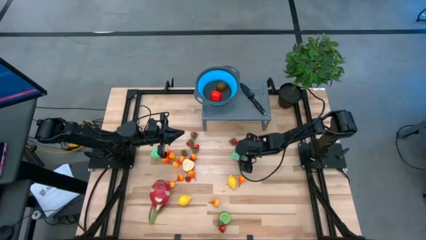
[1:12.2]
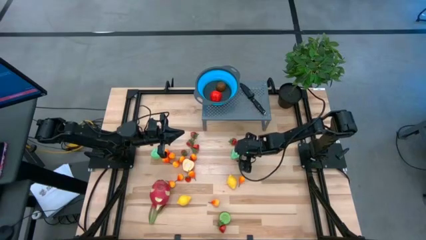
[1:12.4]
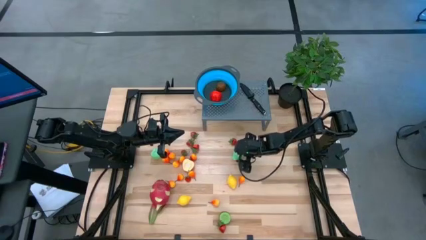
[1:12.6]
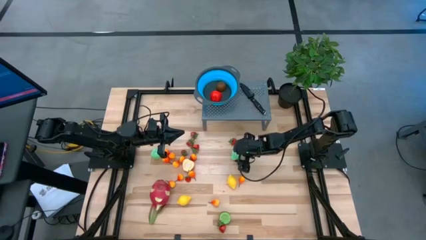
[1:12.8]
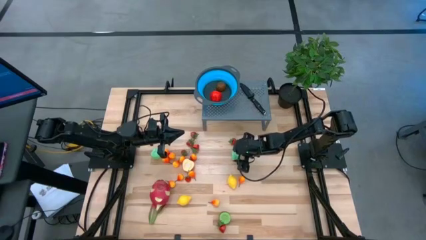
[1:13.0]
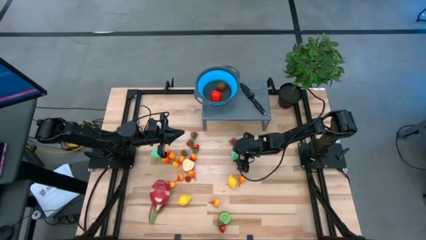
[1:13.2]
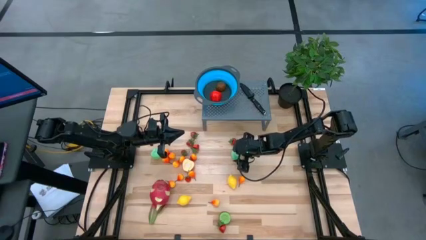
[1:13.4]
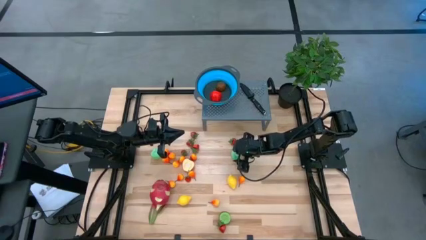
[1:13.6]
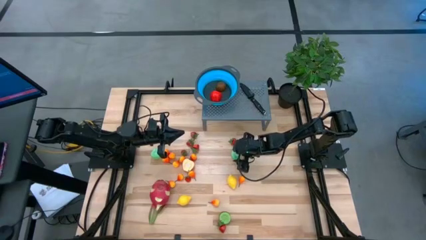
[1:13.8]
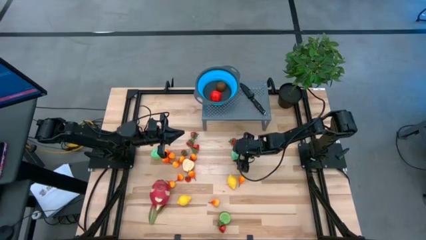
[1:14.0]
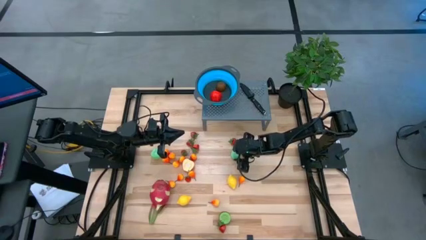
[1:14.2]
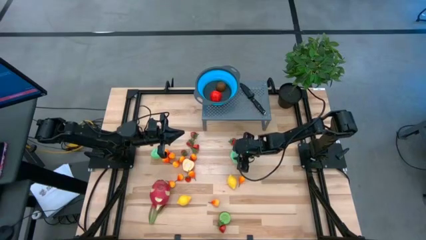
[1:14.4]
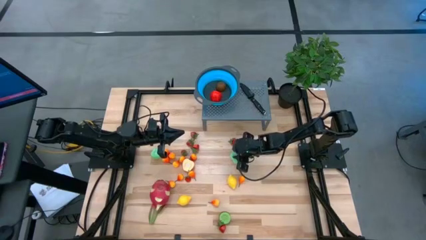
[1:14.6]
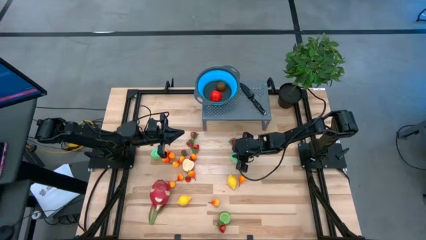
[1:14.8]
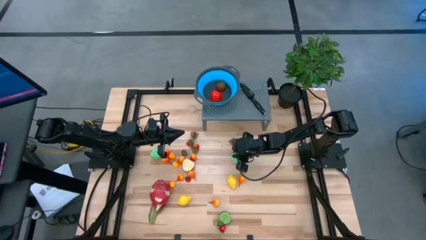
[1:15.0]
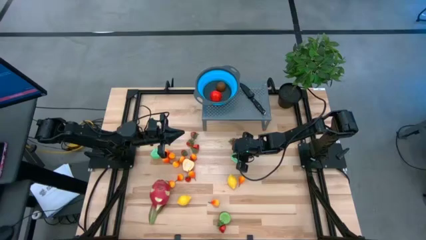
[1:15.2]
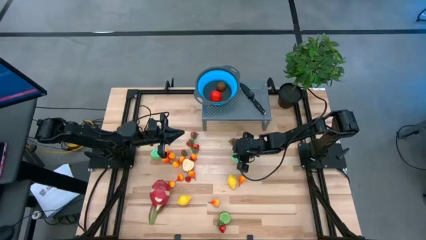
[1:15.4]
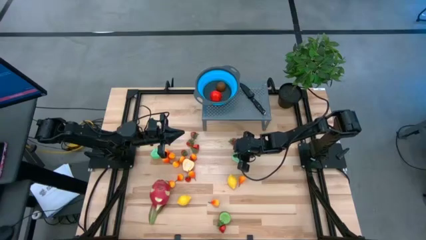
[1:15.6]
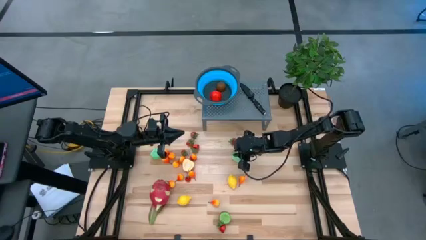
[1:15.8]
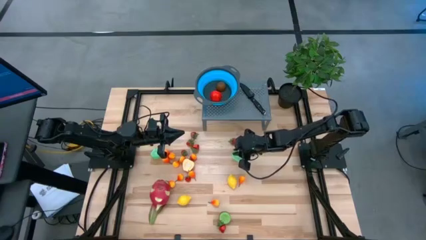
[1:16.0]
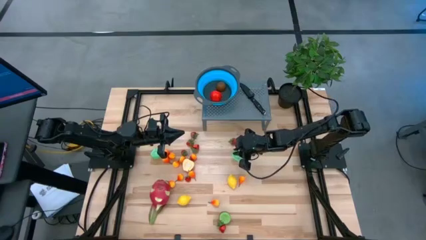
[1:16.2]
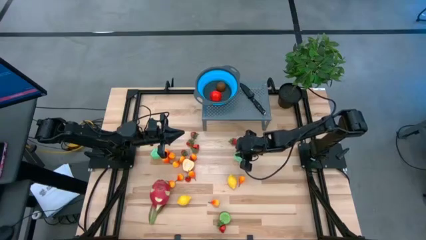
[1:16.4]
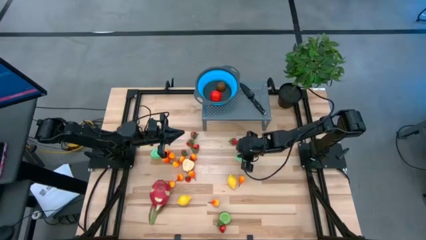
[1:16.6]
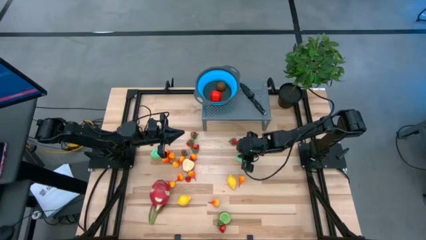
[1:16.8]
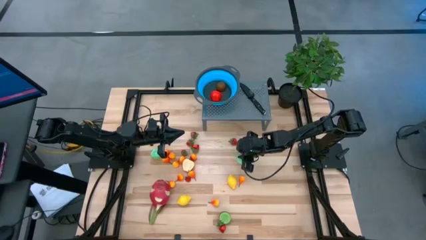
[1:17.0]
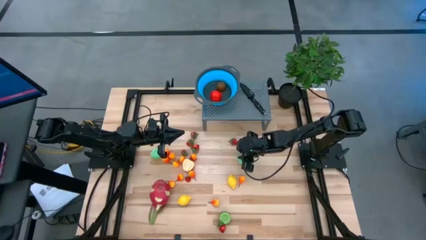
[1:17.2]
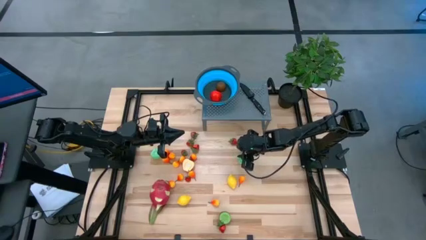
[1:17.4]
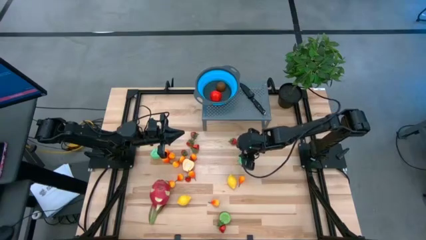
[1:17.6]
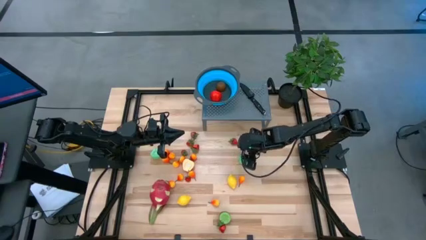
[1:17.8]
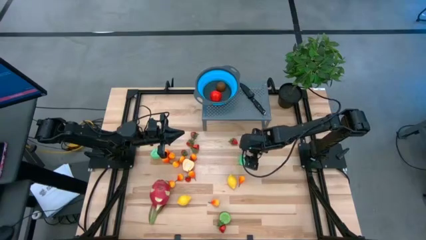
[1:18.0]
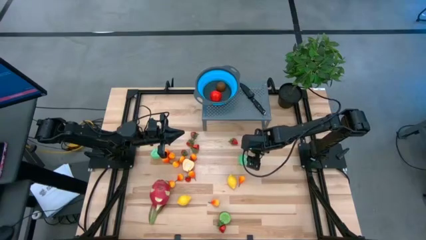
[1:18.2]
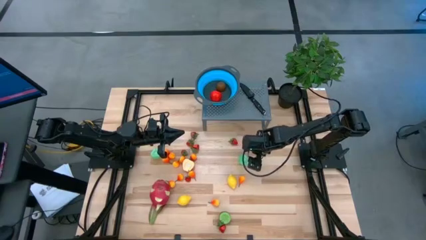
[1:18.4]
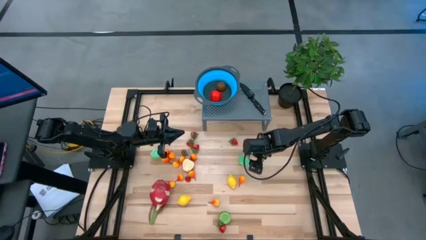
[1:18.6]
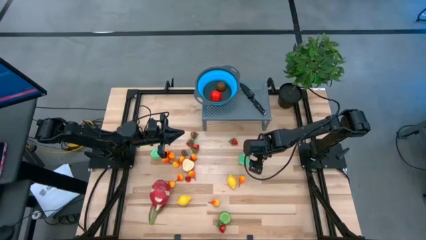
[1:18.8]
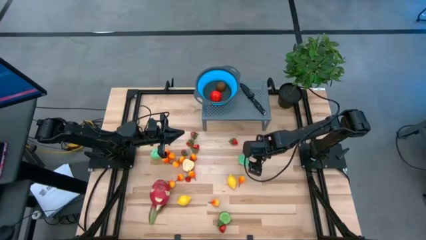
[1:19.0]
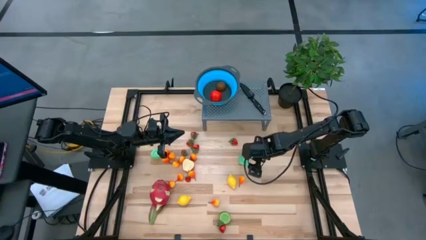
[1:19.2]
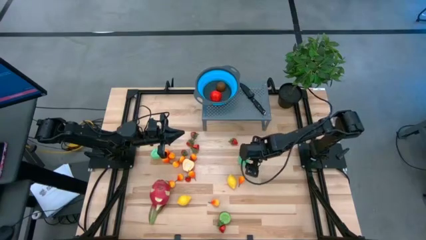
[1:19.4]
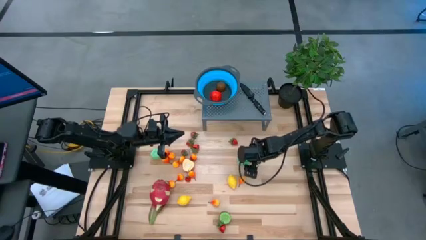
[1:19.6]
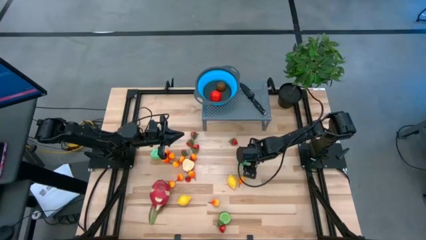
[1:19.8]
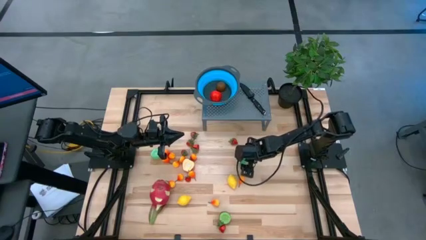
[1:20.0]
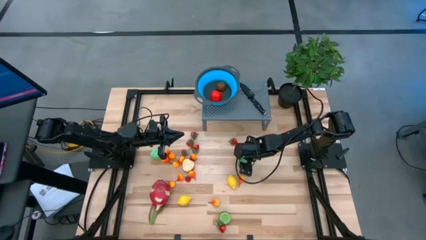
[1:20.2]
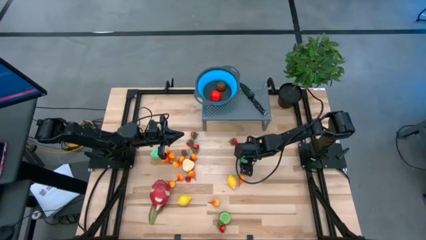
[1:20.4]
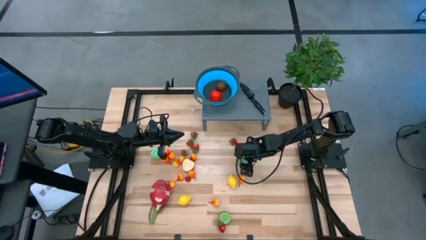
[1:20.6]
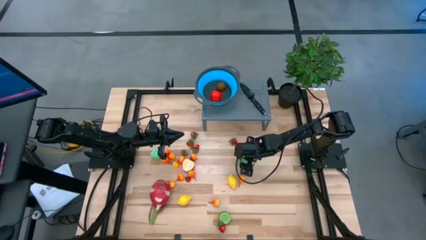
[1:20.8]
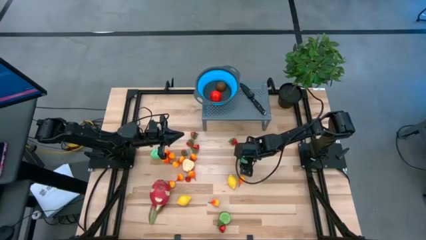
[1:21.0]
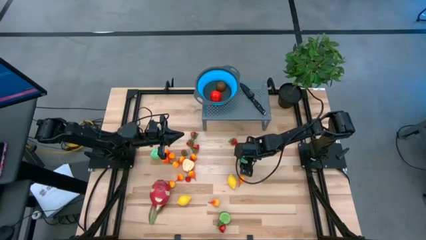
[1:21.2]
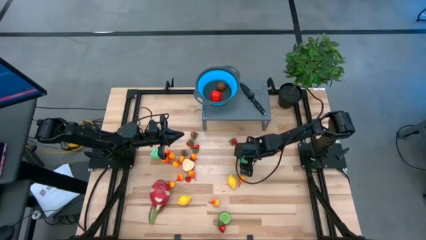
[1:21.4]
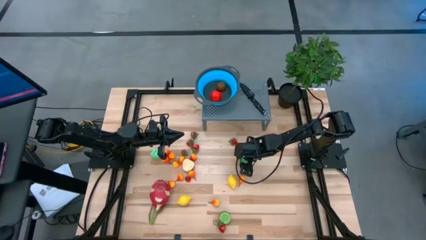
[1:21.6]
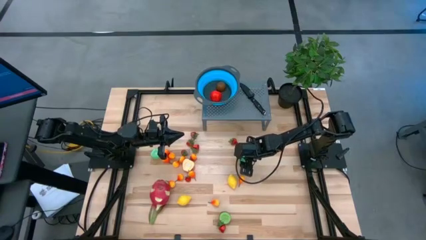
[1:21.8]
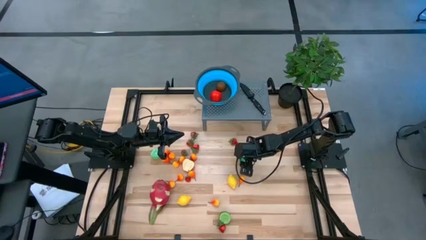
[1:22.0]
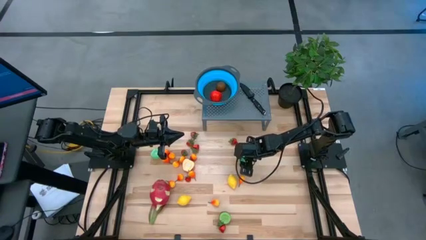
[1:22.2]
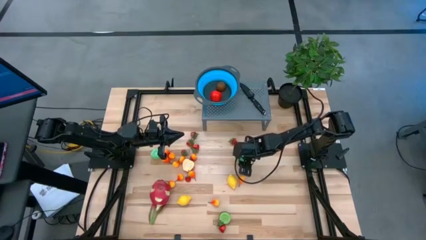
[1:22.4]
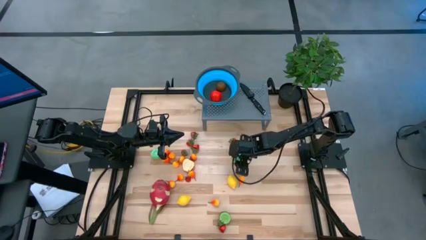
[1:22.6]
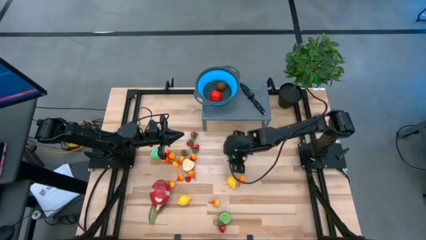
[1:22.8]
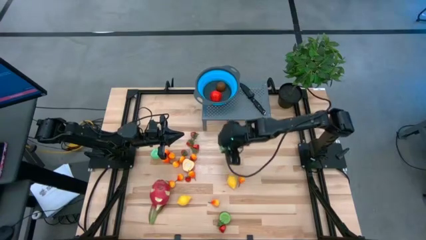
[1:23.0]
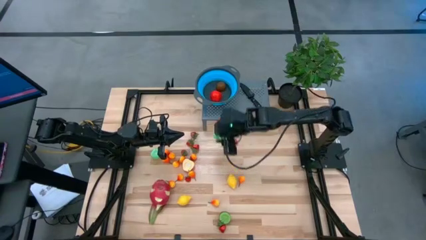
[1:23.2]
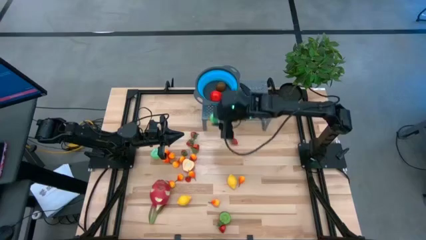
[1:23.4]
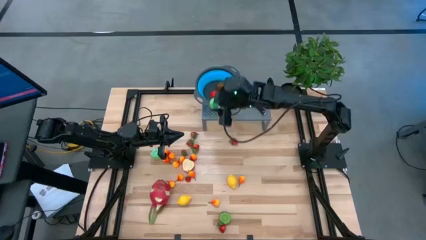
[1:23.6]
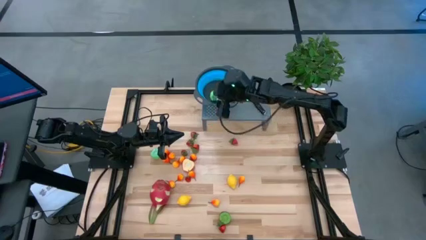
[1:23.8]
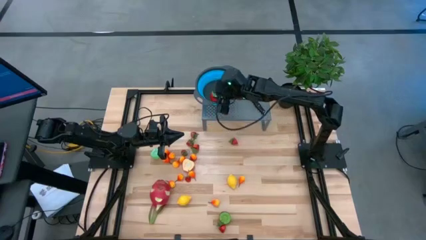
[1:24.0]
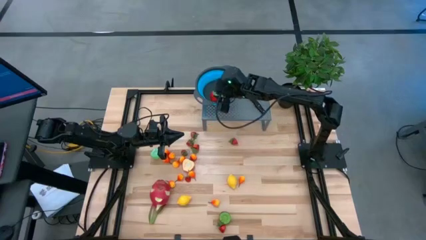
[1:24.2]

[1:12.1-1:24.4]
Task: Pick & Place Fruit
Put the right green pear into the strainer bowl

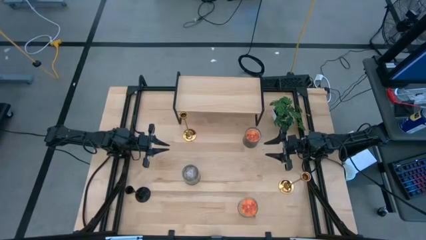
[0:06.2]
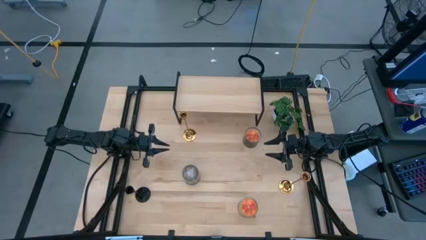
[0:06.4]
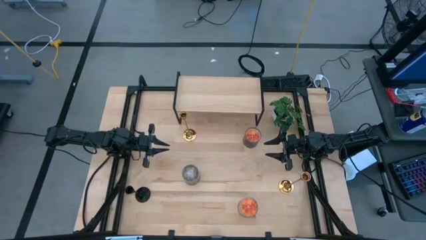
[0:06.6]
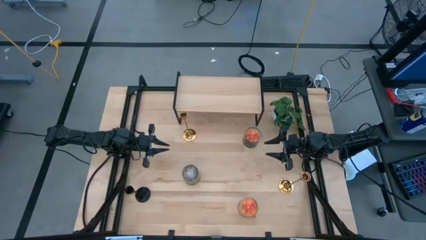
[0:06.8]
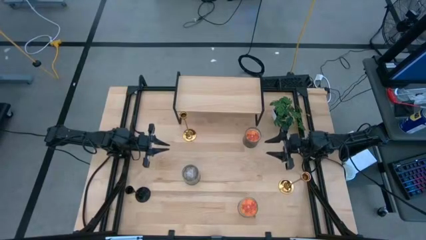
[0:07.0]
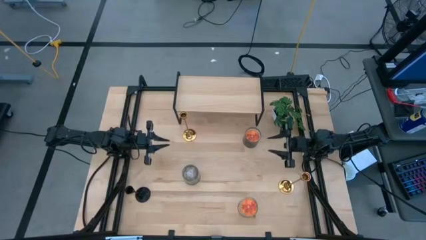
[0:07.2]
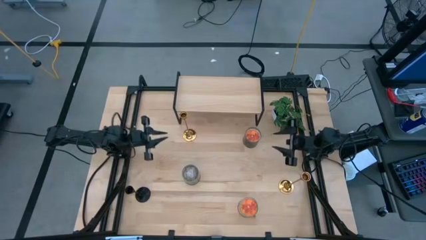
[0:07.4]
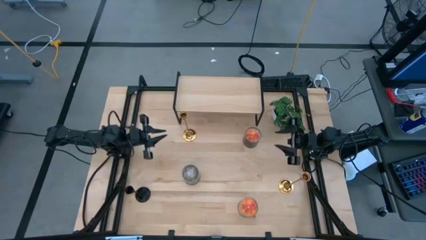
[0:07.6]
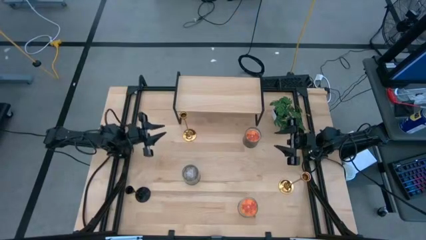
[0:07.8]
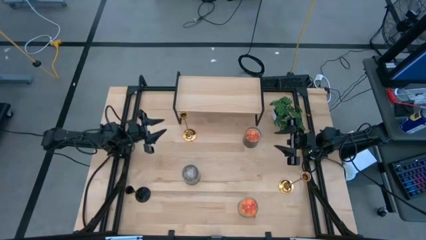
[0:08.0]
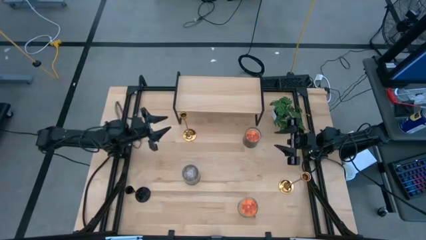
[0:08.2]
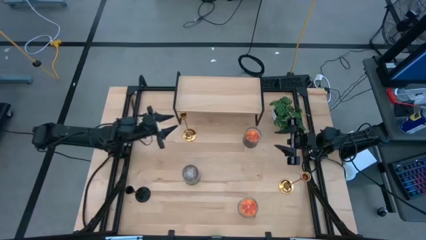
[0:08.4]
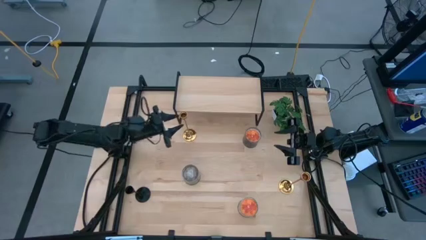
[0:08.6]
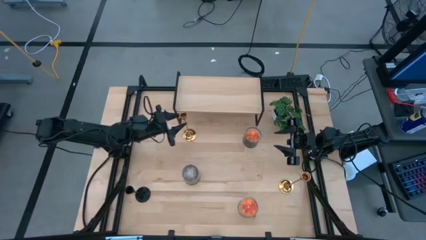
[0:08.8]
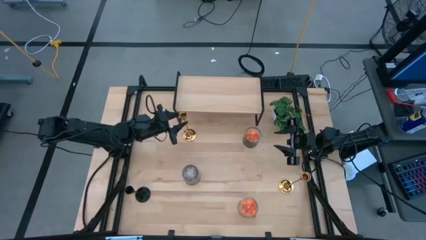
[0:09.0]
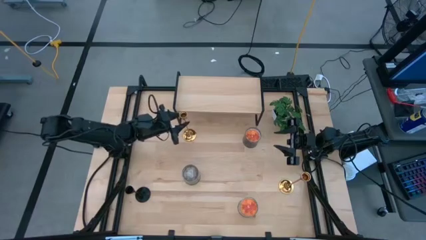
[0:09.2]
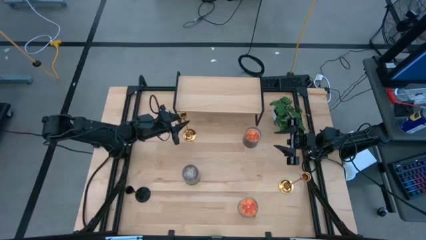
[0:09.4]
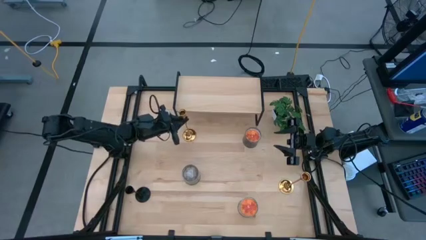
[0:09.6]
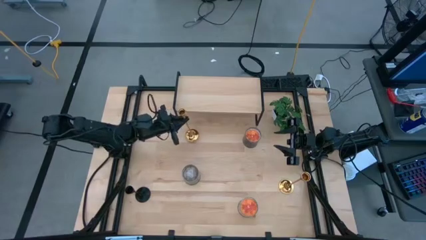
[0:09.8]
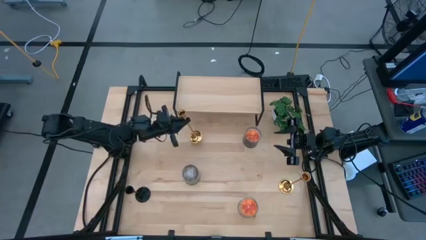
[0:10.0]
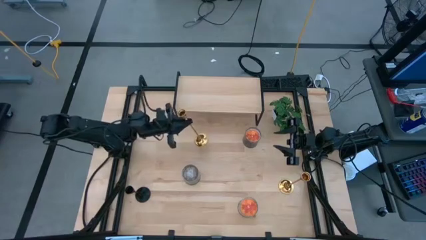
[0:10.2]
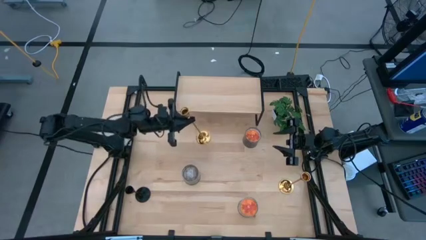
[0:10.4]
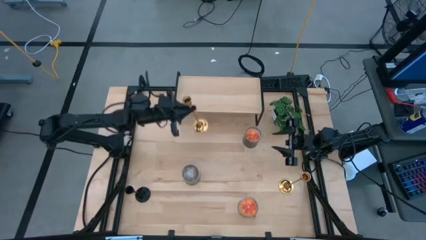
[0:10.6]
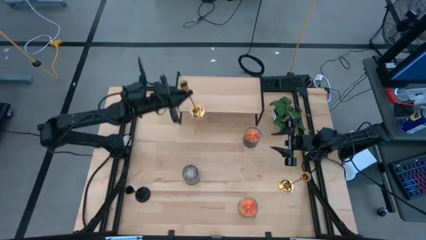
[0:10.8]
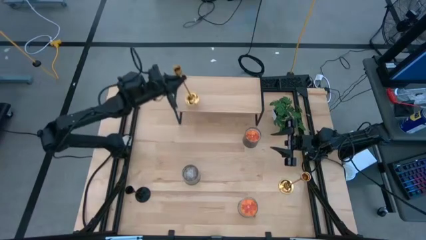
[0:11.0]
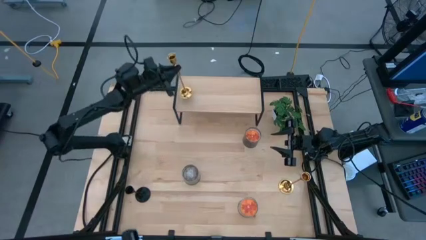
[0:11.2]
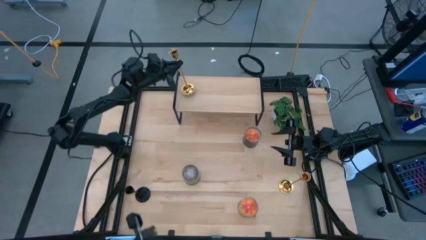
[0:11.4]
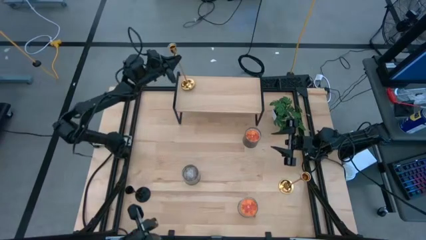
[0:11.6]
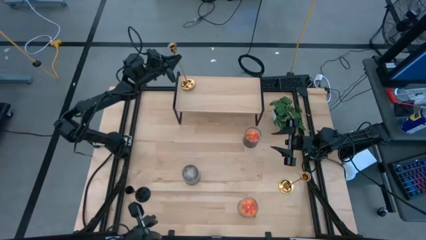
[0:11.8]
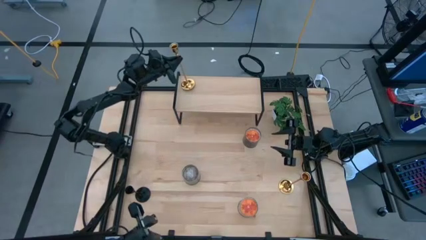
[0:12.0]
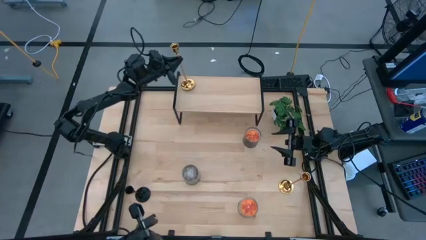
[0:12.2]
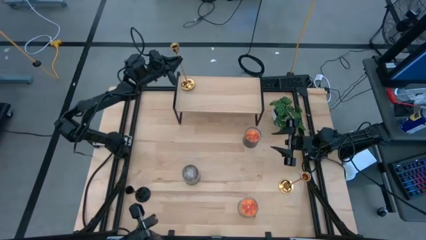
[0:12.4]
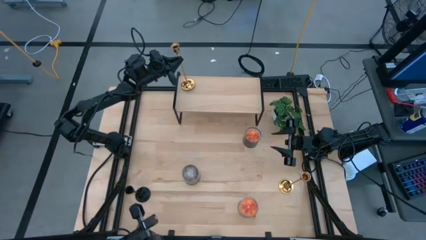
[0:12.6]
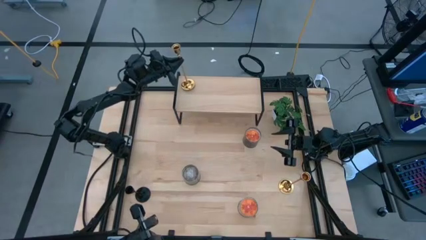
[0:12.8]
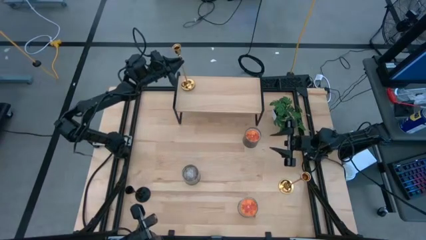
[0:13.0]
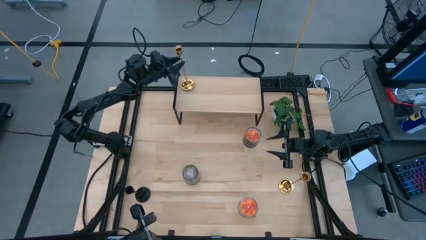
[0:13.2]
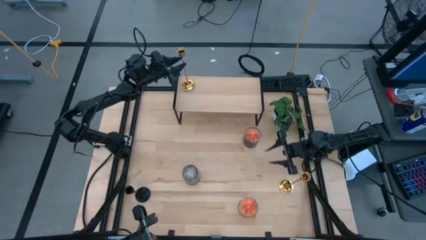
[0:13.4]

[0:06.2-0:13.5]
Task: Pick & Place candle stick holders
Put the top gold candle holder on the shelf
